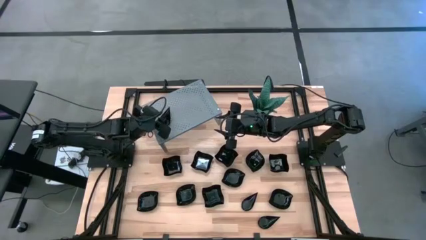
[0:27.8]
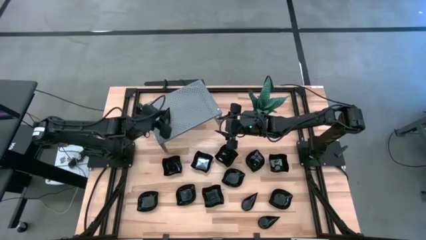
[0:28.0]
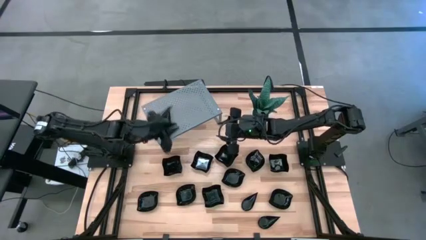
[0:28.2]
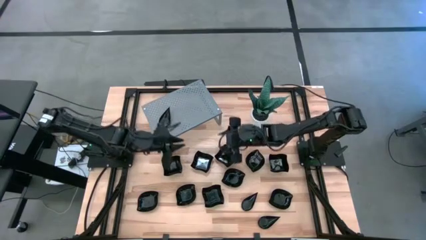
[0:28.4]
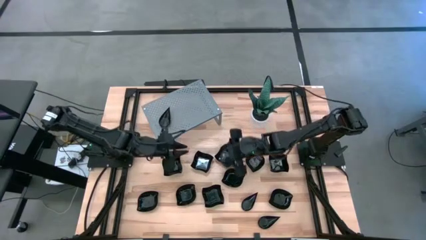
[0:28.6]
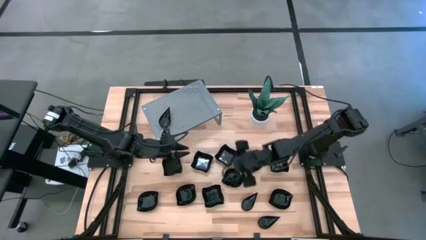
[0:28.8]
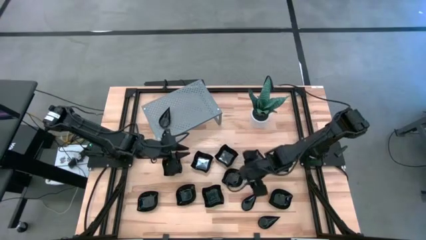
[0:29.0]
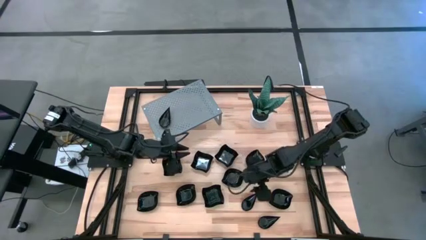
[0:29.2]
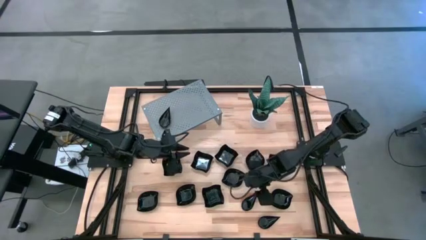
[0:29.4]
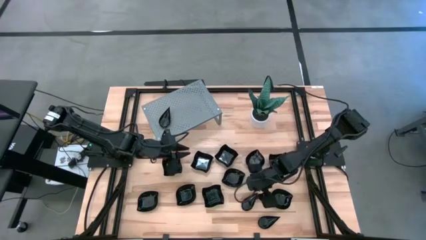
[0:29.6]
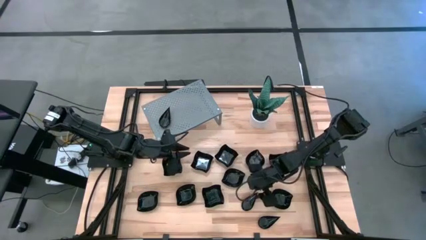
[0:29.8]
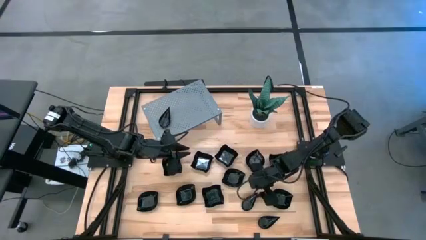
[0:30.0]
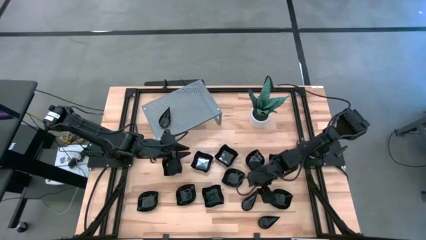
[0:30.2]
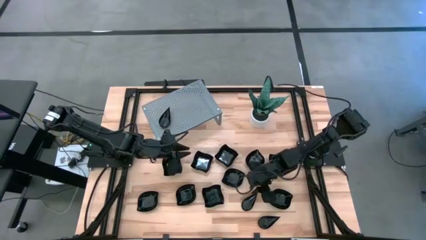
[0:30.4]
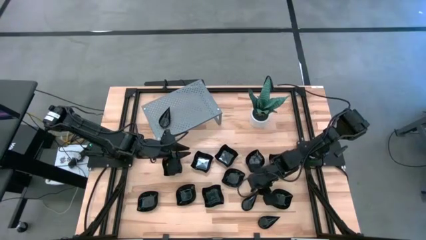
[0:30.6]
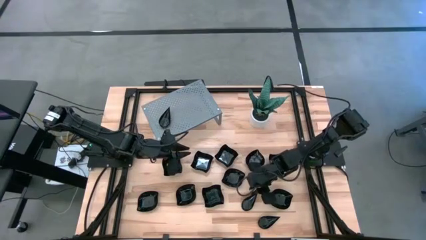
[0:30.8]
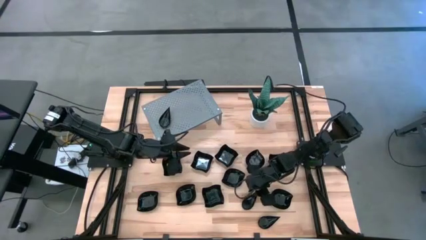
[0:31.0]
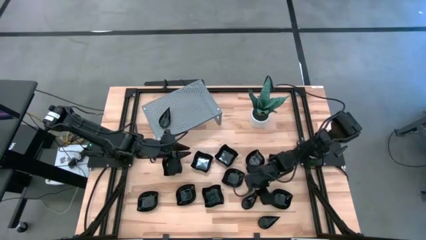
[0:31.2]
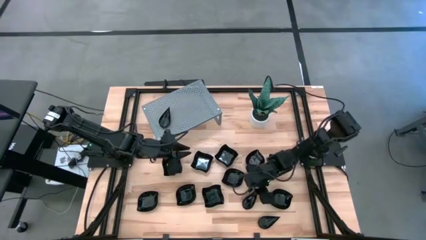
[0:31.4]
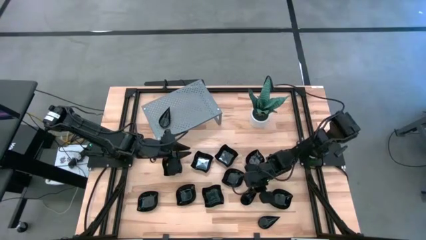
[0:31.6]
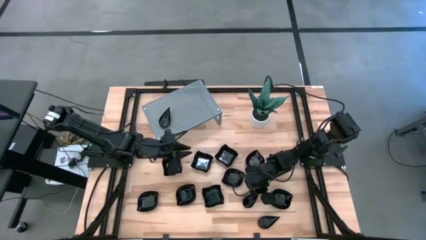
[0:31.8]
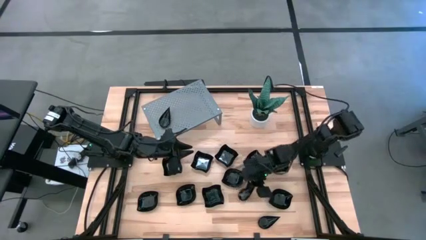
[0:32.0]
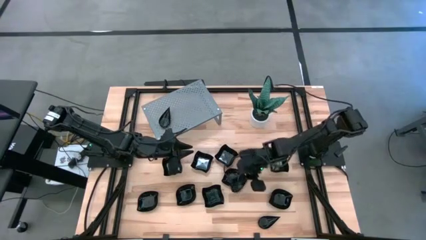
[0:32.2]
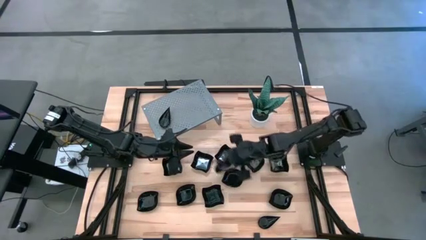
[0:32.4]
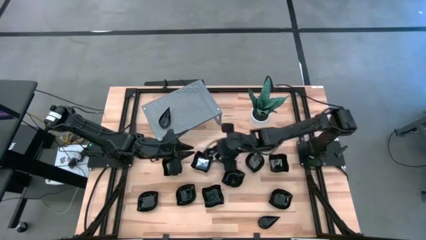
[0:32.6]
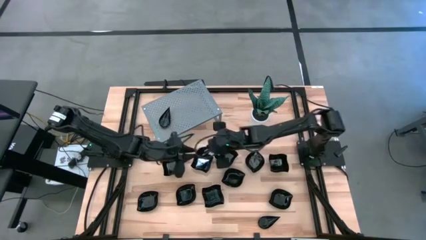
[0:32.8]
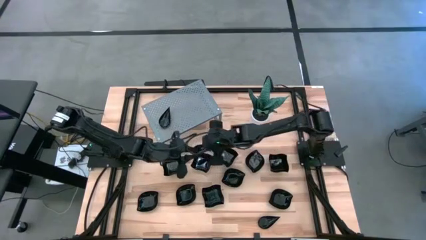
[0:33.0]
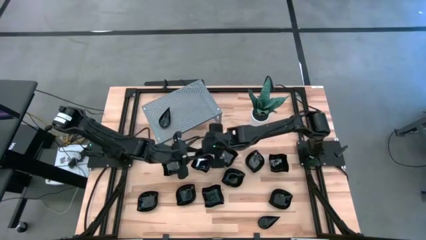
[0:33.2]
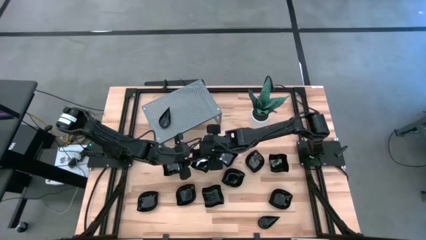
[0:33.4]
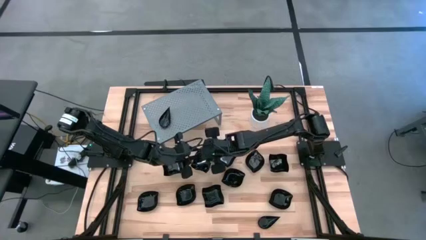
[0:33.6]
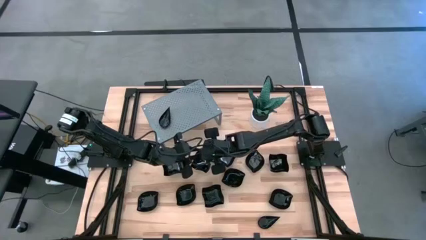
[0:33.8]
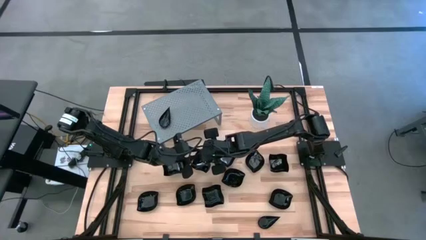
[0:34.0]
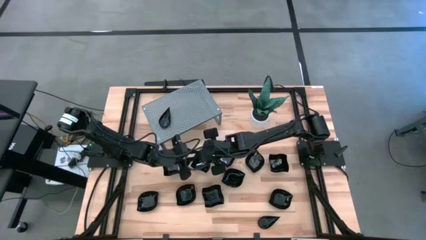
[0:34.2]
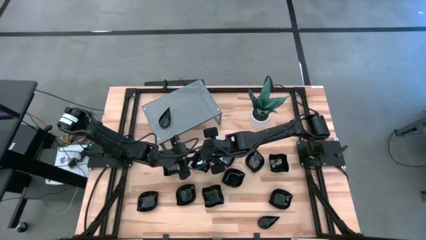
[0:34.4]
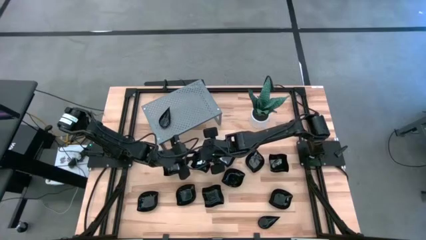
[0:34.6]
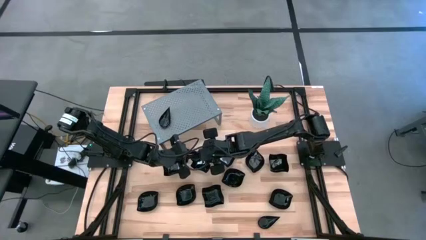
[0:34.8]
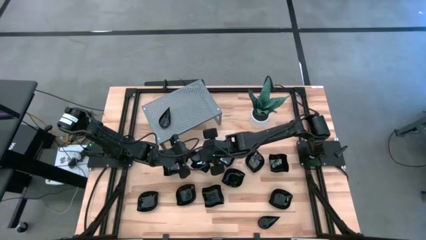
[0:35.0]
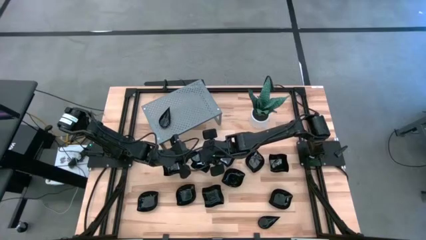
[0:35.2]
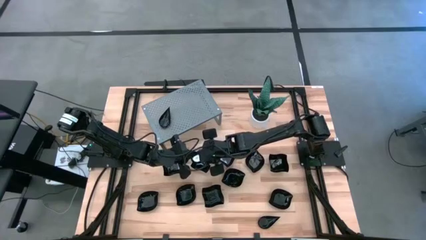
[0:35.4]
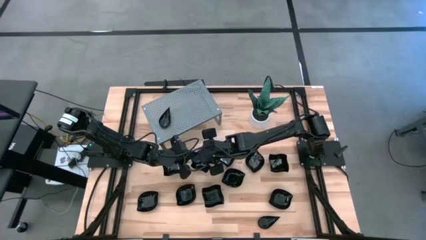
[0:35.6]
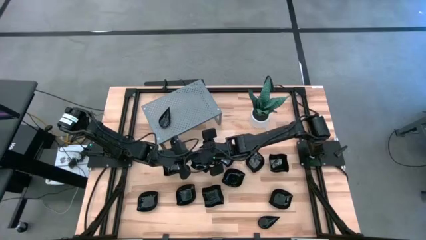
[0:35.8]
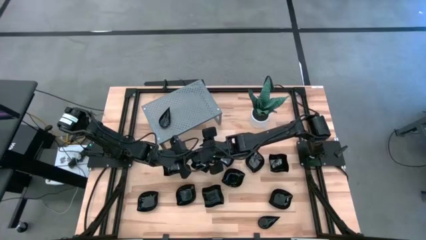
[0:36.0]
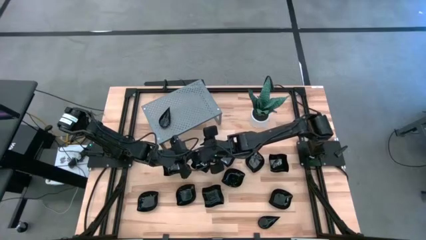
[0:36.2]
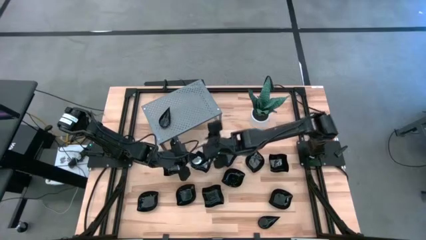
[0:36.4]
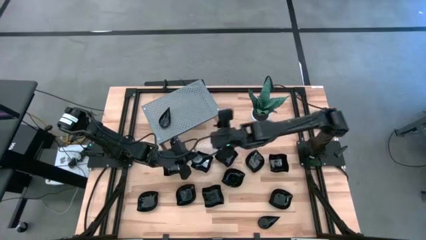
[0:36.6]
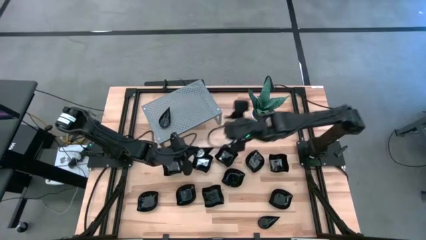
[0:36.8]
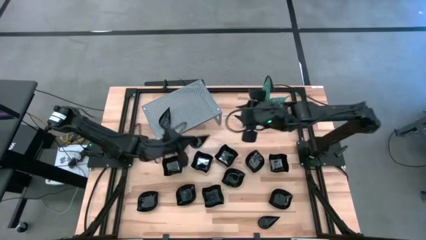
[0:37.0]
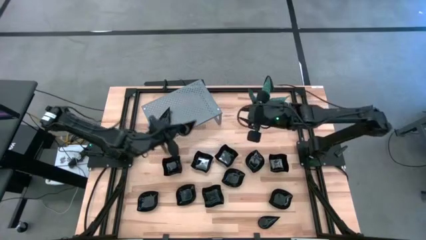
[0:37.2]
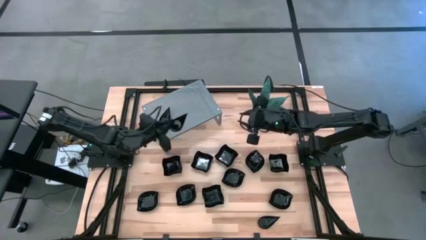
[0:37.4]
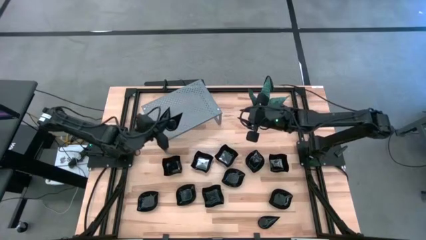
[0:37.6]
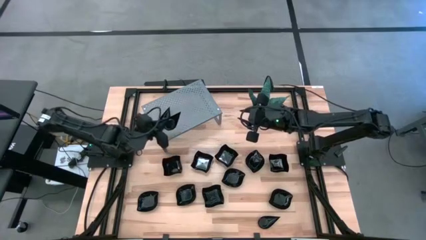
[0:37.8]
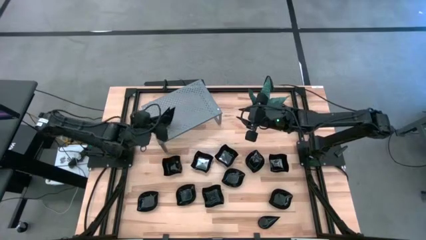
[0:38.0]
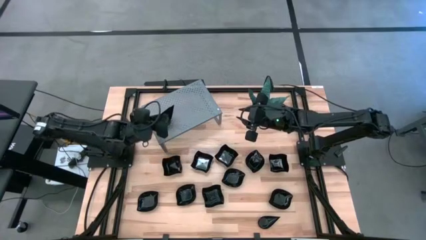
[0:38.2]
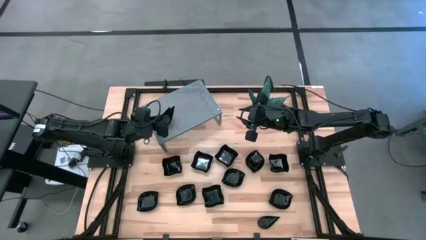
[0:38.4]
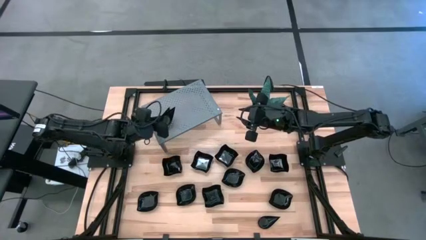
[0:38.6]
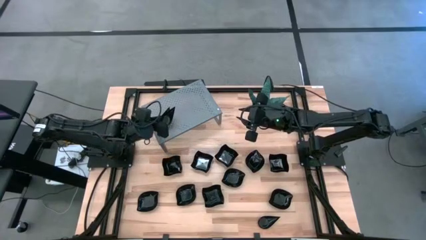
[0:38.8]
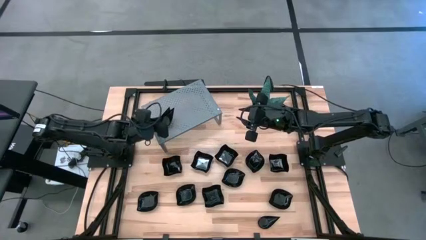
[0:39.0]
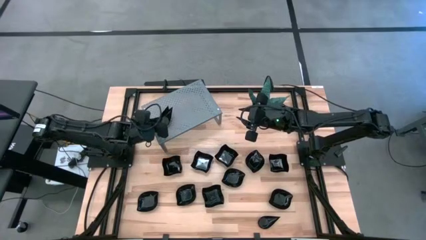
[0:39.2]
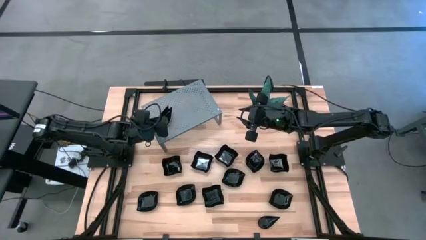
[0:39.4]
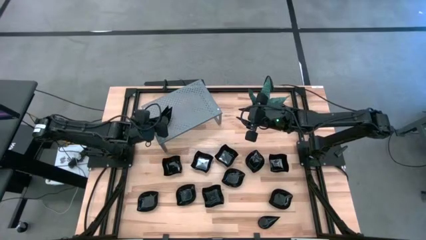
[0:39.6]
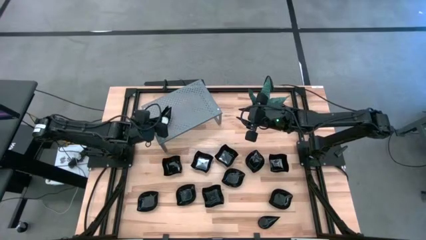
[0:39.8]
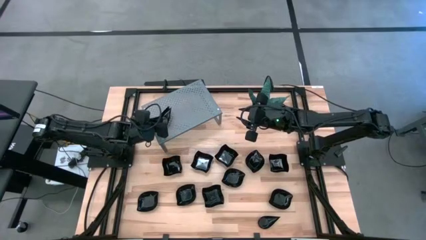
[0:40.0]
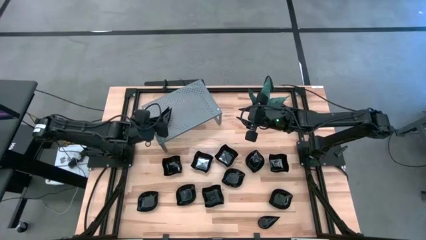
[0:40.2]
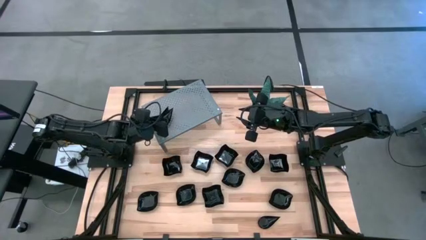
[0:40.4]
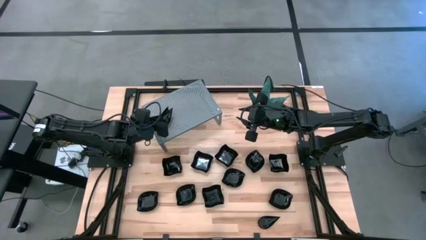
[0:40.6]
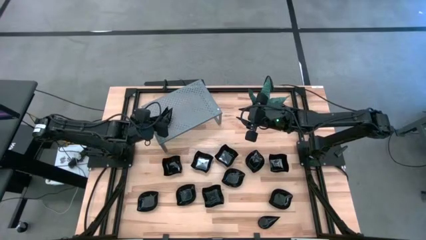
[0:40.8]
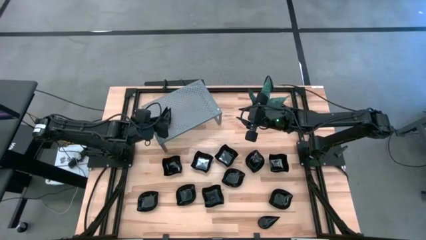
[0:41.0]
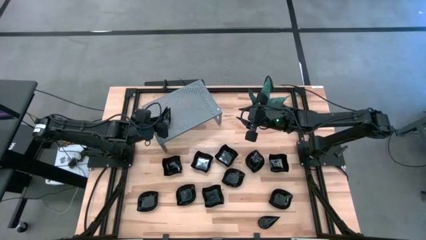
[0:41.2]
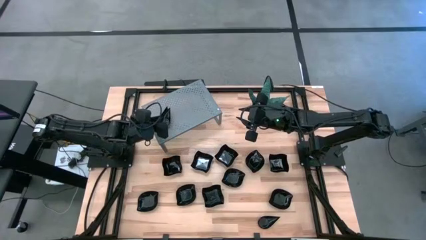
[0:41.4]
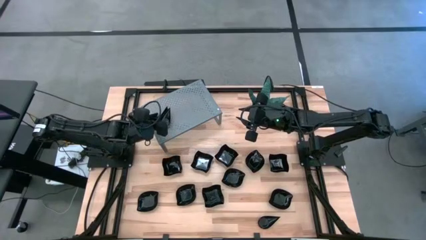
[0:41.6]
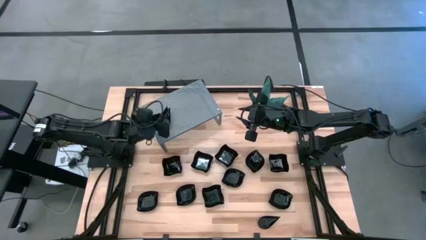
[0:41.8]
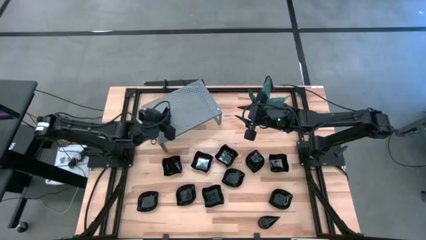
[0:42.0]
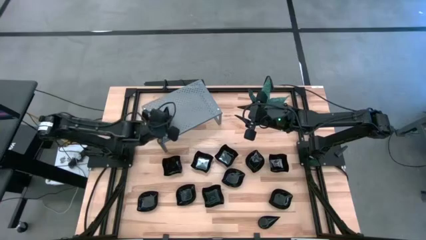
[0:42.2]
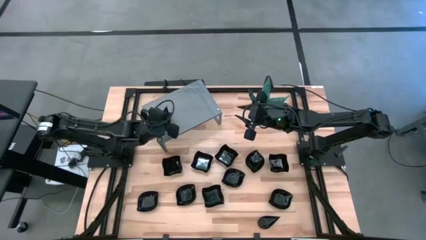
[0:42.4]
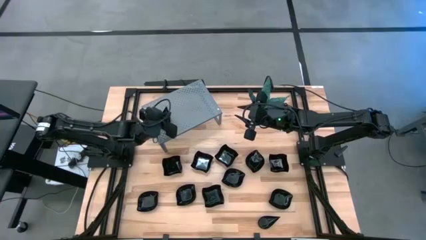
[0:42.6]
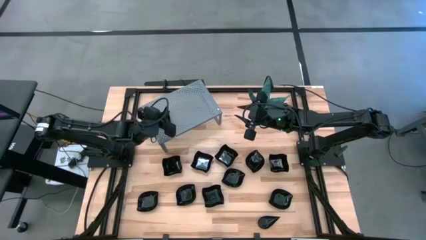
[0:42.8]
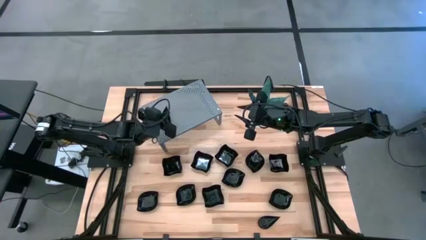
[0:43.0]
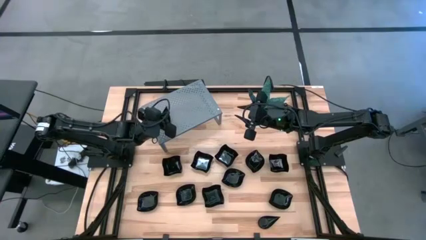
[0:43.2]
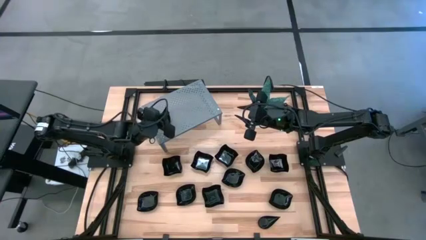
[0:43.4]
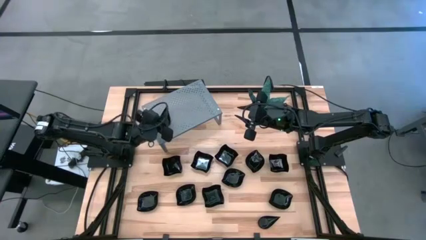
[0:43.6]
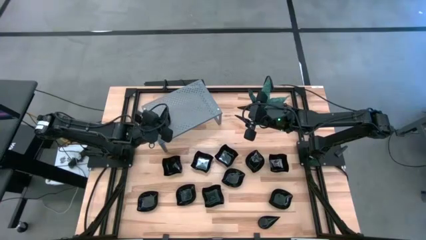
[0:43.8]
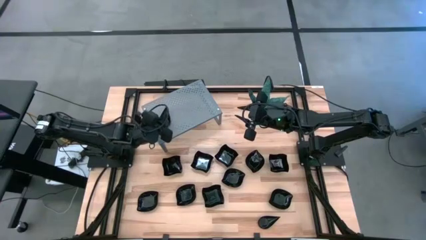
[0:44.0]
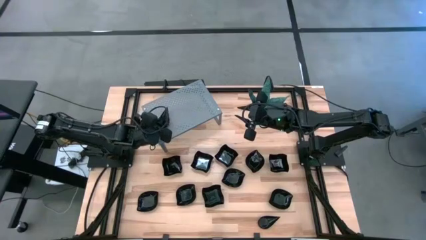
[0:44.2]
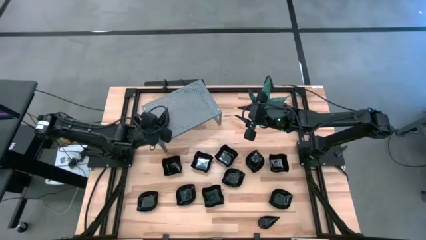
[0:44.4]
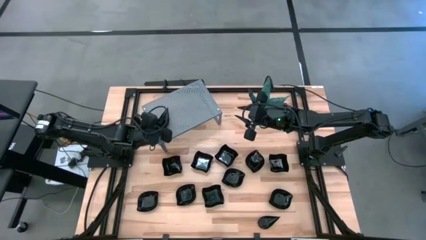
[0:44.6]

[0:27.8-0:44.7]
Task: Pick & Place Mini shaped plates
Stack the black drop-shaped plate on the black drop-shaped plate on the shelf
